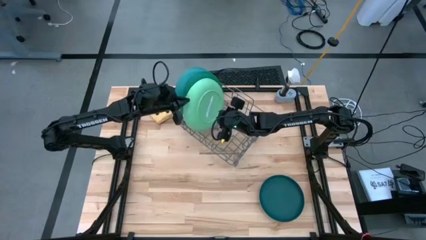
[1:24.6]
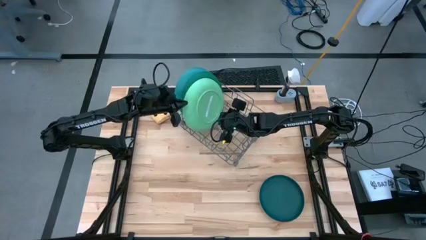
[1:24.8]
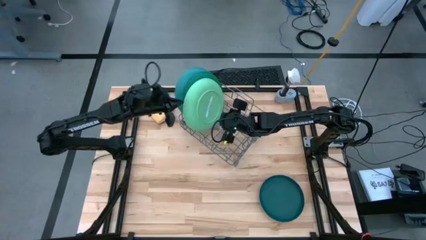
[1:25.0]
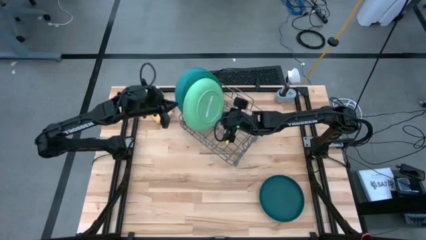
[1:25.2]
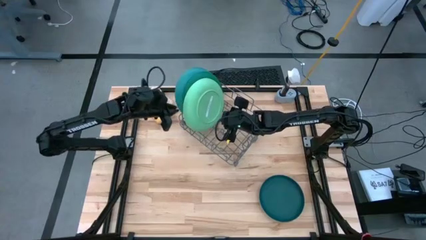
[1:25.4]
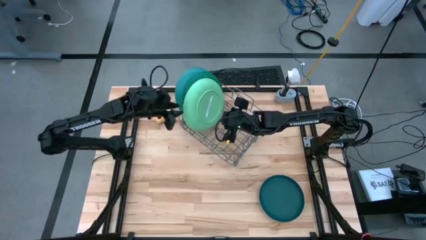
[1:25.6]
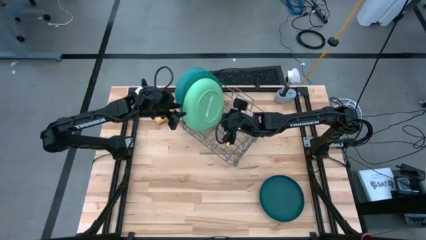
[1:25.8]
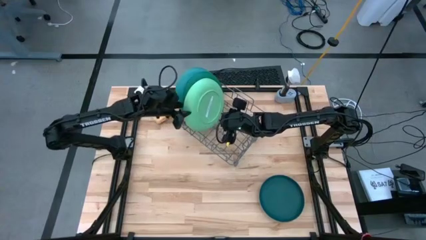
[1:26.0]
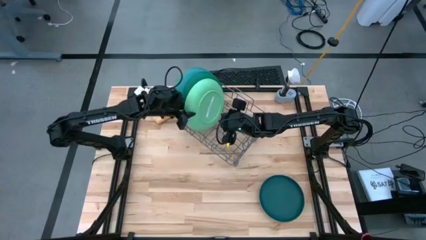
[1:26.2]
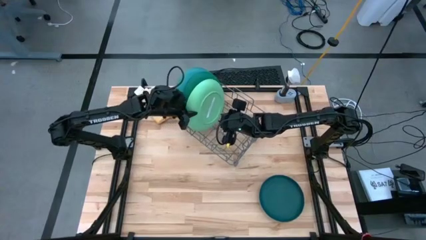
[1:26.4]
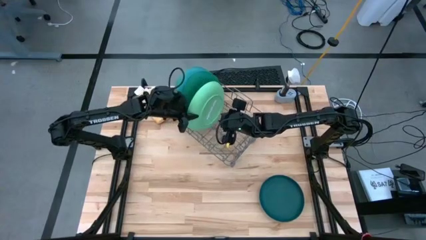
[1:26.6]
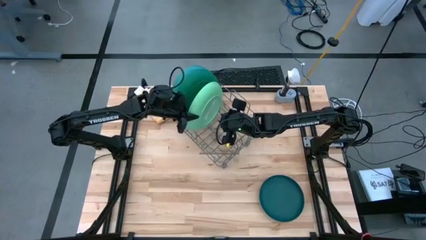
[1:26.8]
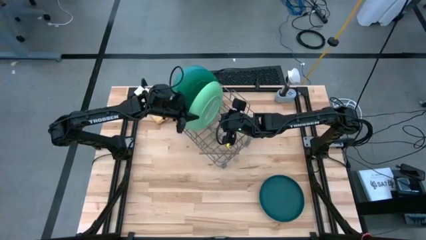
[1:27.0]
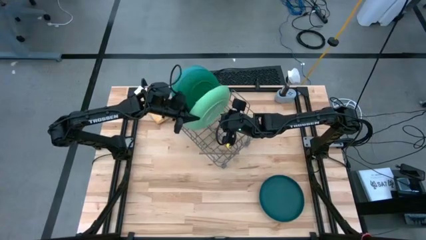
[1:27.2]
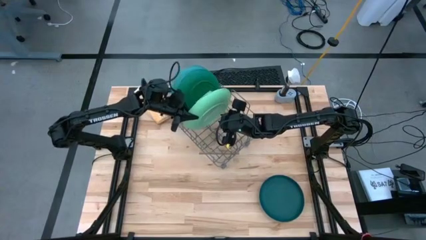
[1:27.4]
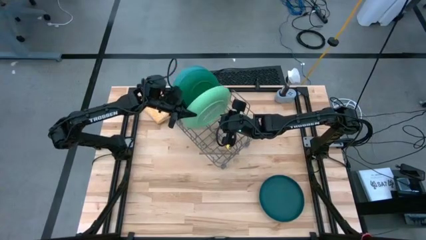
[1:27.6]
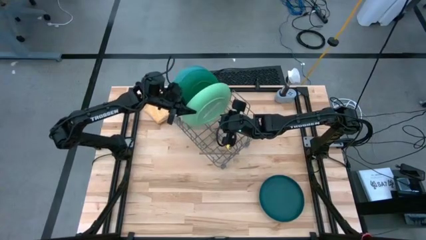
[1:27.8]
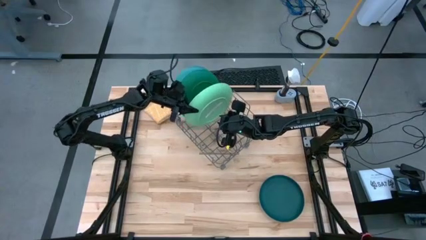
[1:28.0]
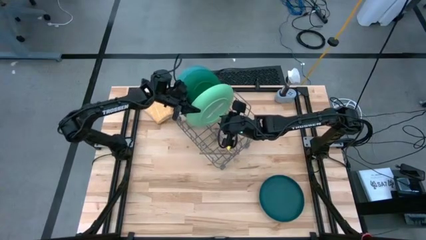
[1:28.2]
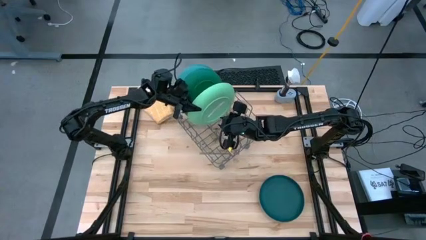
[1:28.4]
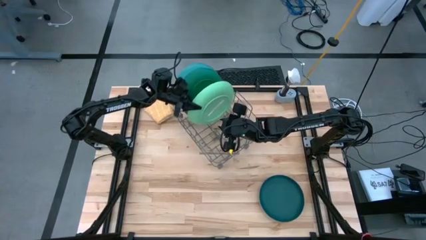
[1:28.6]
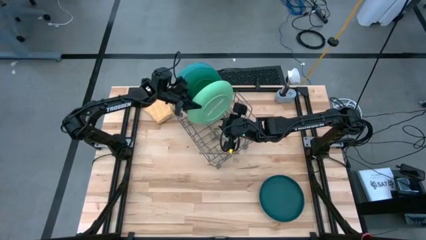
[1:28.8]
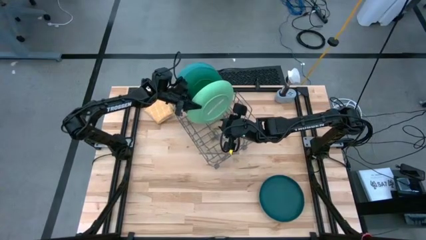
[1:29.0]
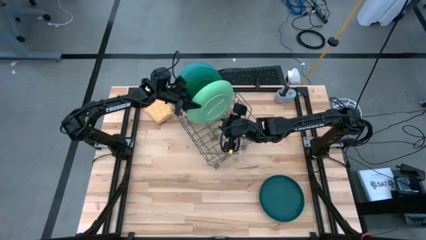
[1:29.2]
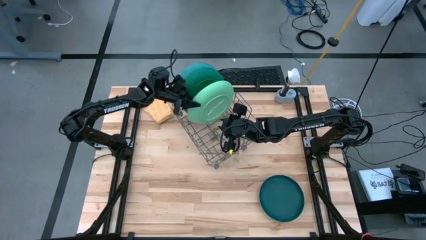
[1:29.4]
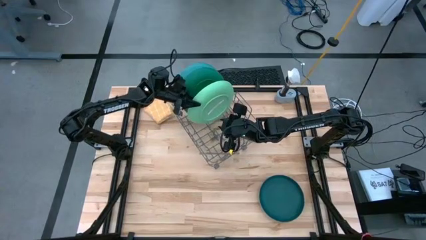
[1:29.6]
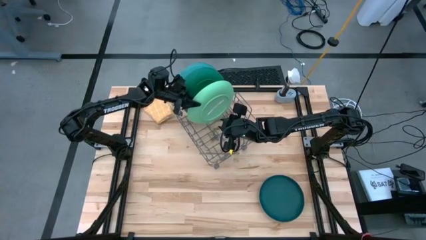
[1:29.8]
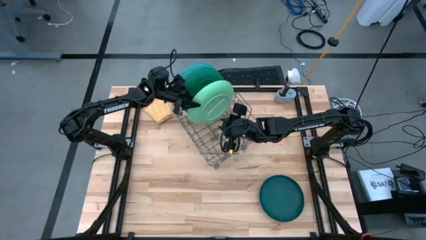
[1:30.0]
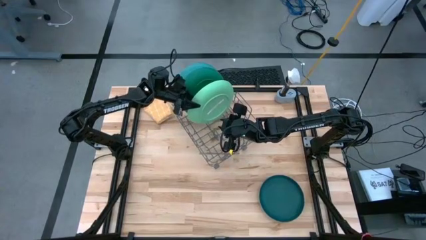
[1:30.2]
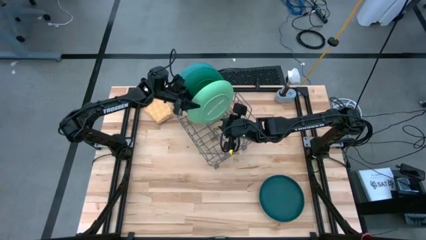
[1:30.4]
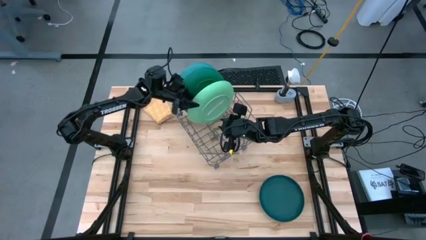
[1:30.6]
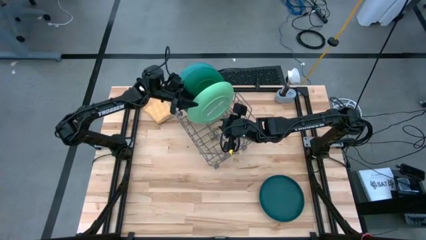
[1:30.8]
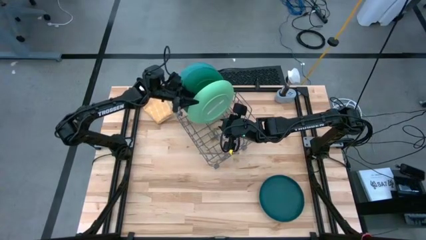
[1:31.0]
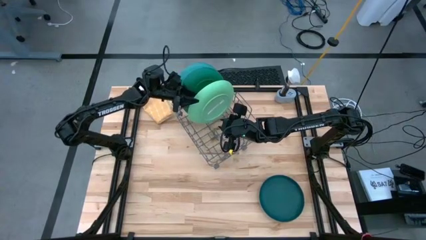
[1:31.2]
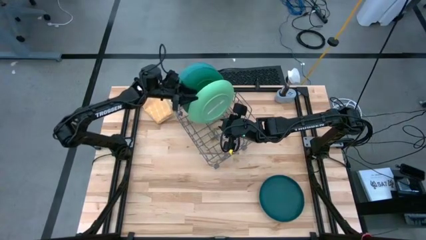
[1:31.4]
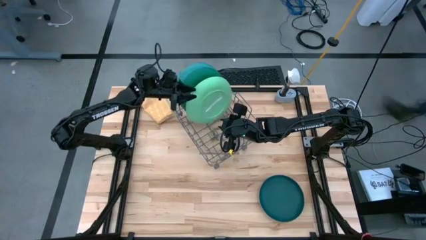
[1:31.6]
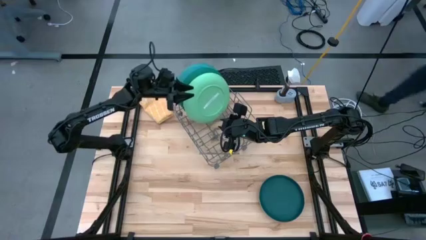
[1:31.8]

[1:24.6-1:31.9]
Task: Sort dishes
Adjust the light green plate

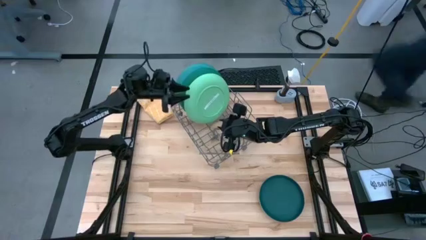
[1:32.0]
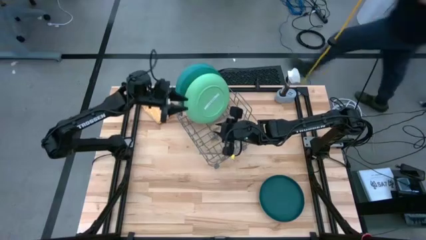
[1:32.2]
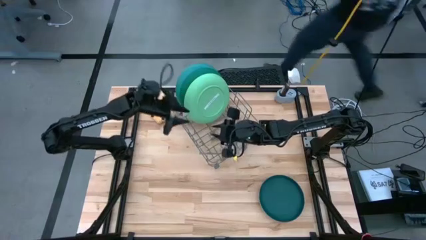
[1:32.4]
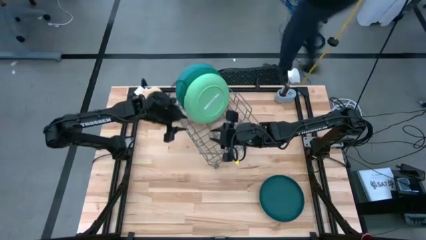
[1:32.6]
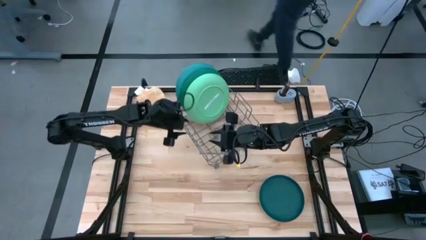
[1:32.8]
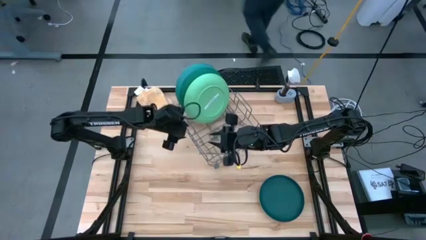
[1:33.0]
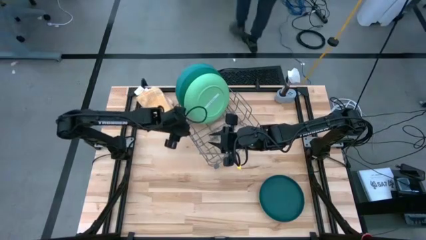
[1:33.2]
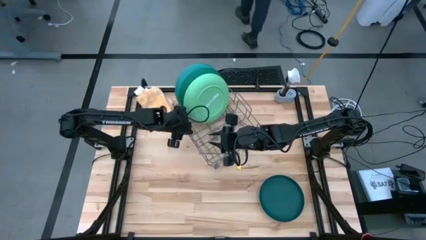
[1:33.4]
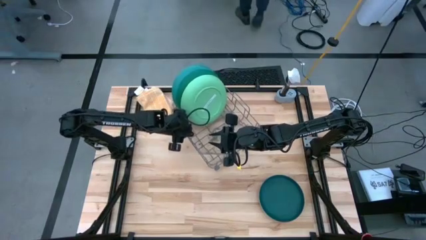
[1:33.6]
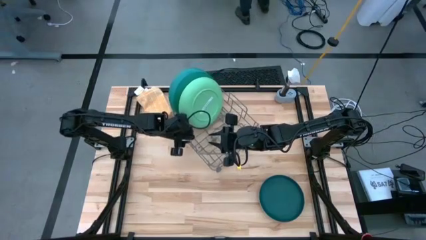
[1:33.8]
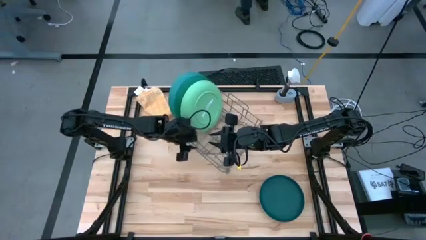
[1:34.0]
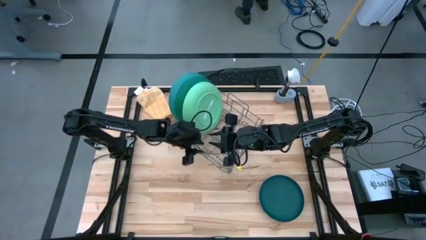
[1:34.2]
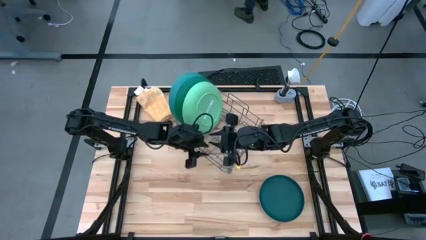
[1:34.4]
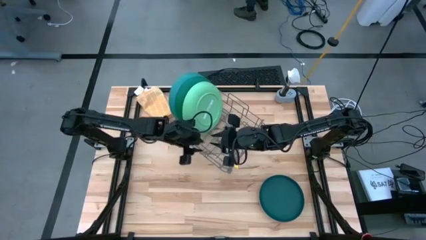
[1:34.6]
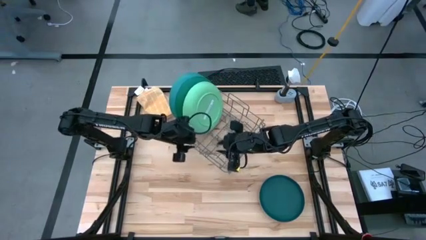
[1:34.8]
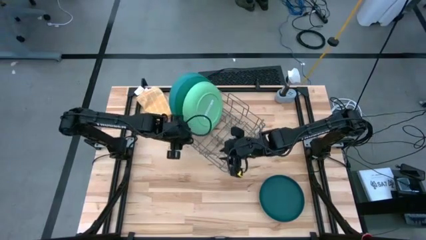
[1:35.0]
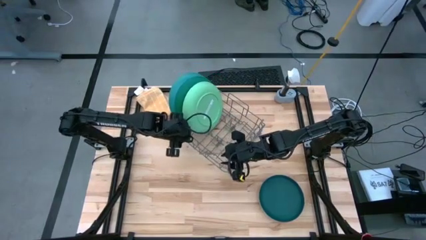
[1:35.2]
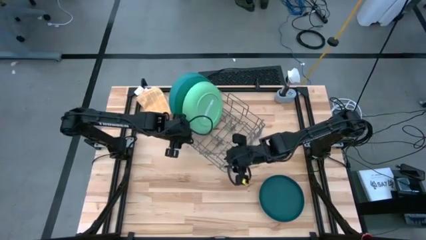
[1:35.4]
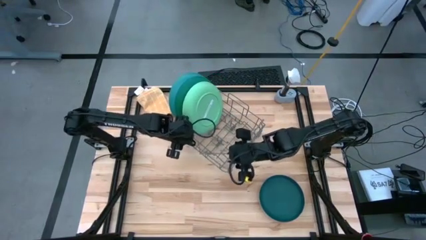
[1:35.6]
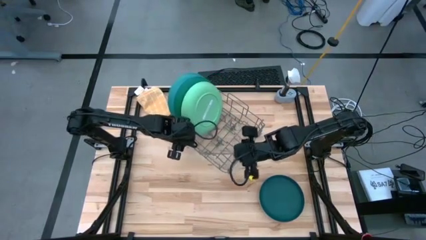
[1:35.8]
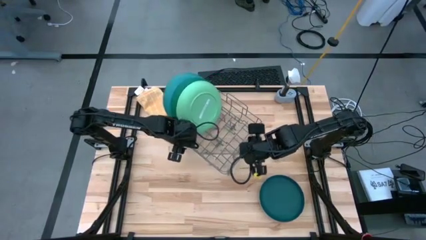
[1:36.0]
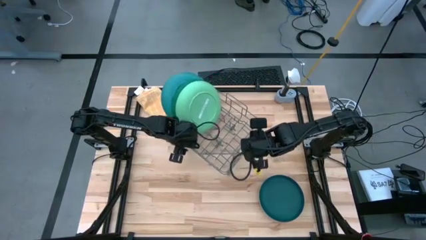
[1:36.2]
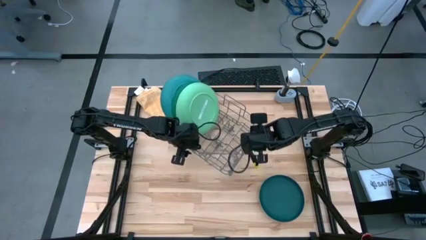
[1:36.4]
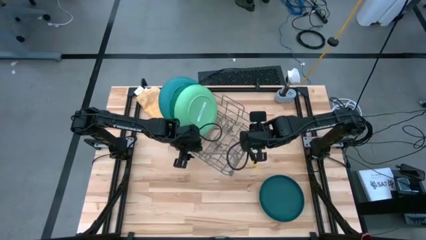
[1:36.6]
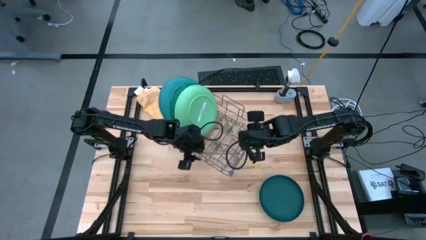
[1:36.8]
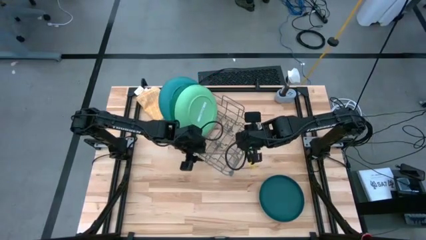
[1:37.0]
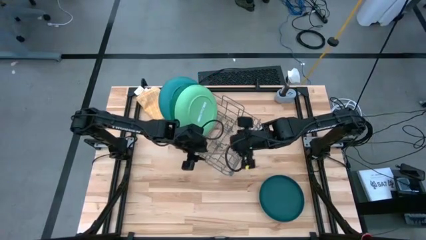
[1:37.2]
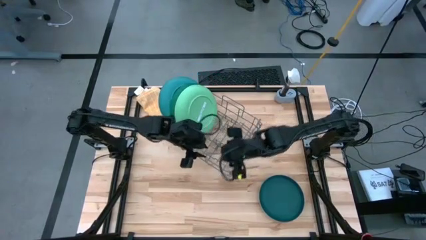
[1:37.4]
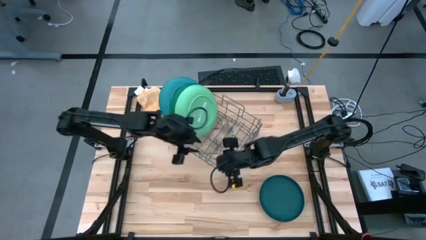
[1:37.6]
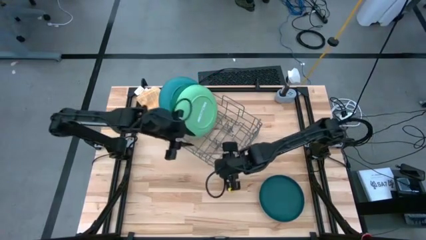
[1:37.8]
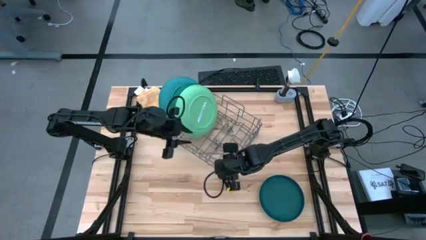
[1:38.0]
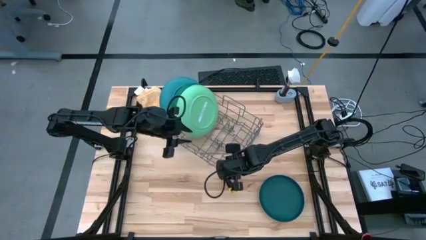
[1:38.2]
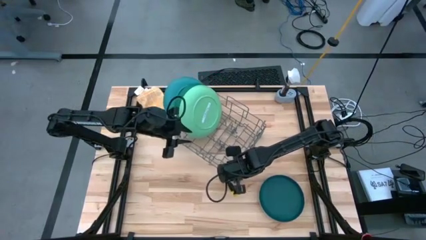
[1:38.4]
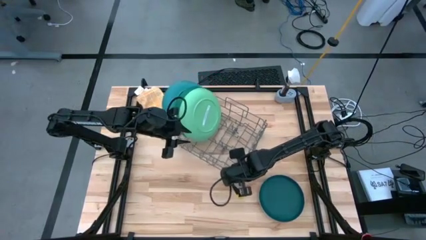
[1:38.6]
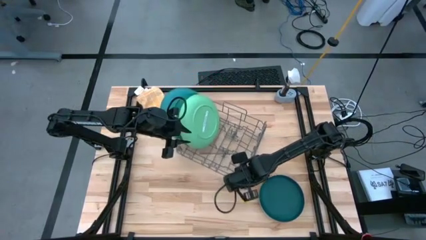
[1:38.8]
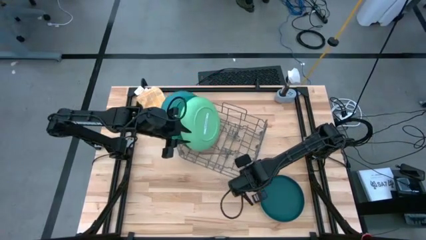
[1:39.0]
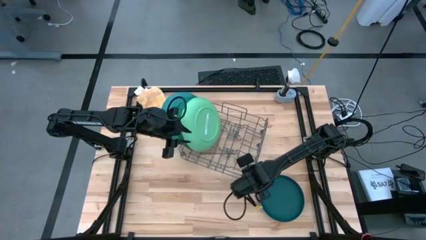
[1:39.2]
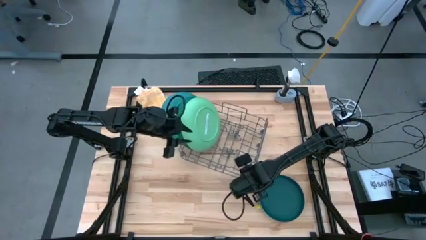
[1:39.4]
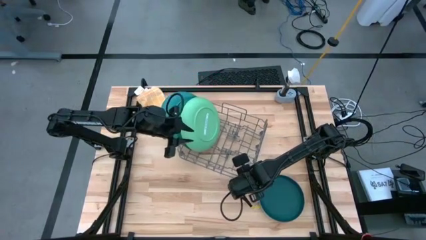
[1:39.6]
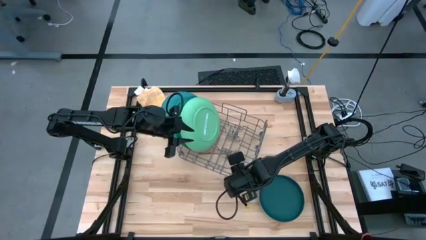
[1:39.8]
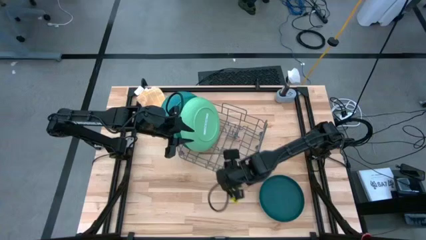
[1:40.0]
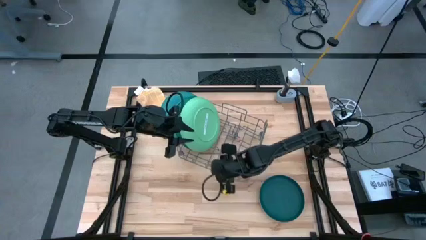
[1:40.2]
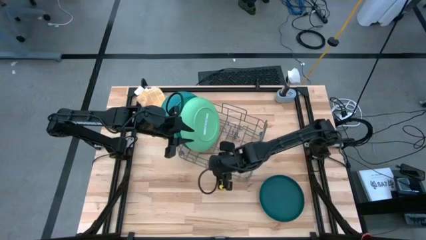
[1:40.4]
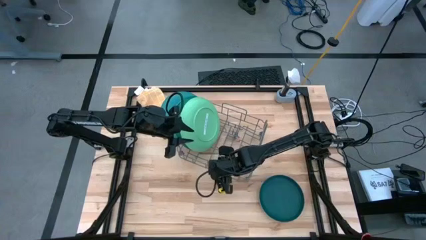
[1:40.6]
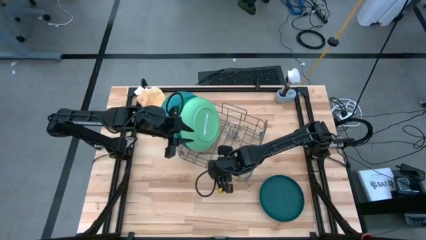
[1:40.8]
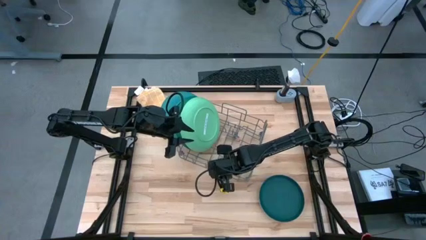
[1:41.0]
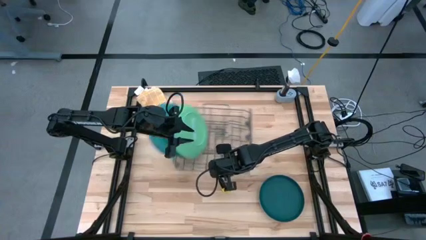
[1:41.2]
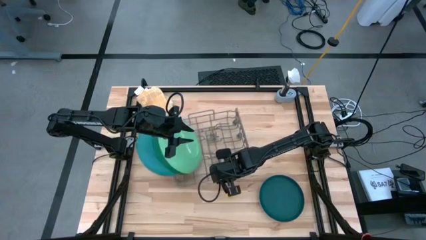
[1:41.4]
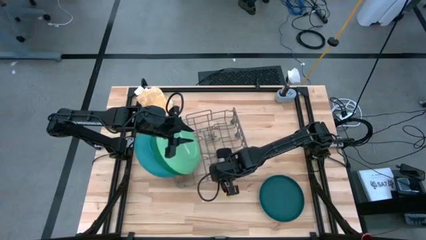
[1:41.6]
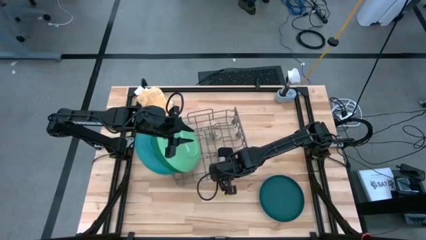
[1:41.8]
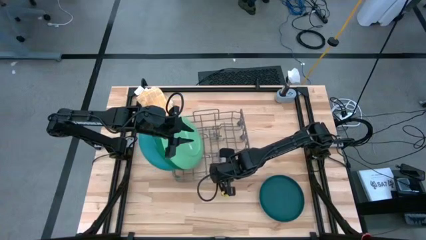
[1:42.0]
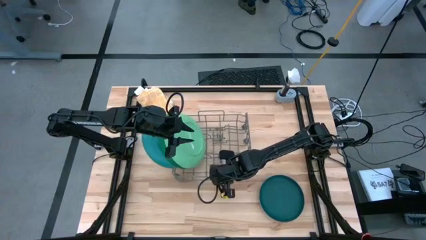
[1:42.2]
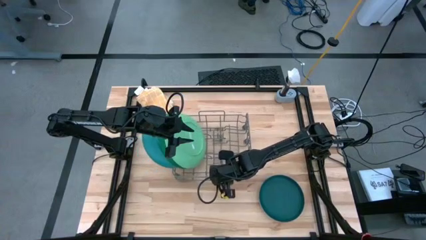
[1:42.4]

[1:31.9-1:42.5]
Adjust the dishwasher
